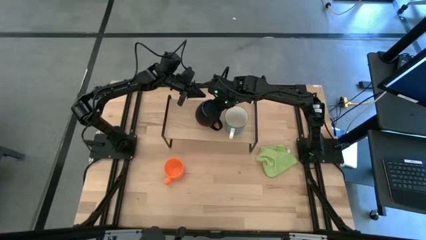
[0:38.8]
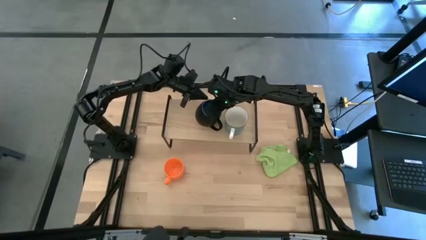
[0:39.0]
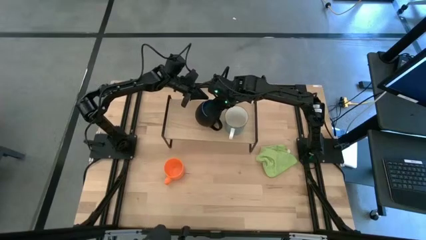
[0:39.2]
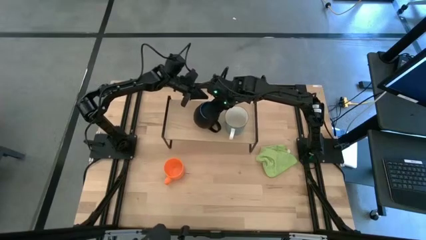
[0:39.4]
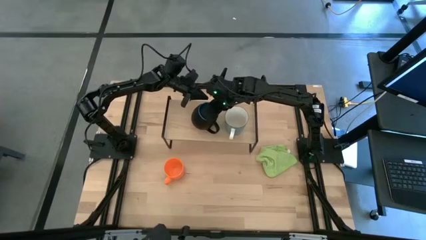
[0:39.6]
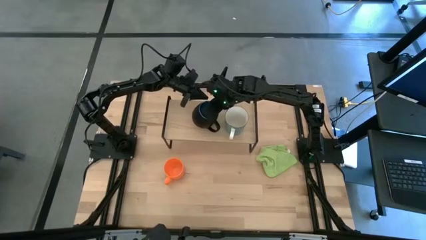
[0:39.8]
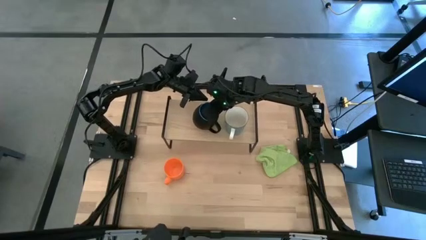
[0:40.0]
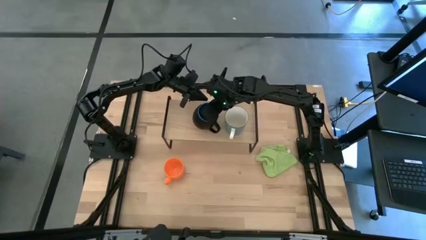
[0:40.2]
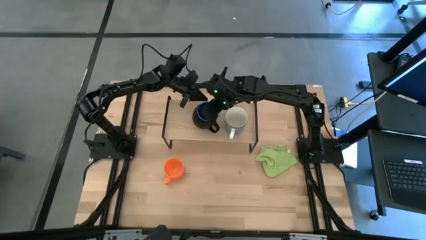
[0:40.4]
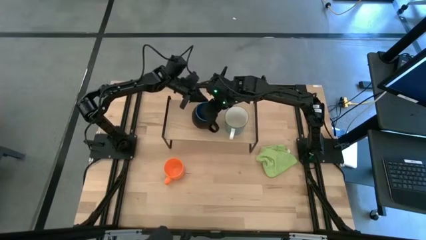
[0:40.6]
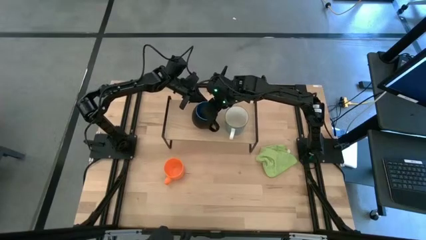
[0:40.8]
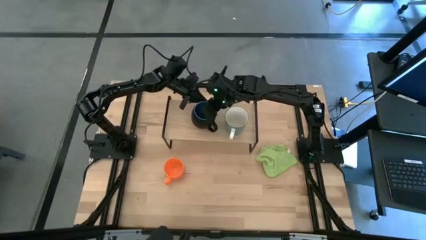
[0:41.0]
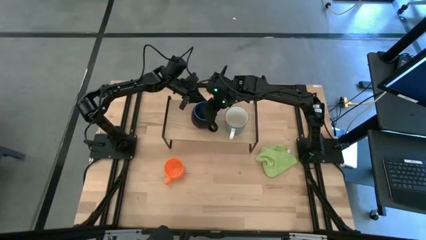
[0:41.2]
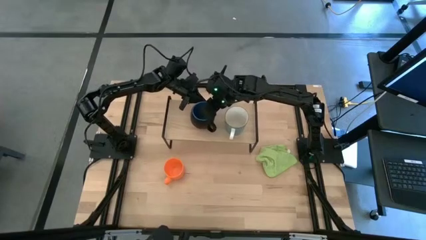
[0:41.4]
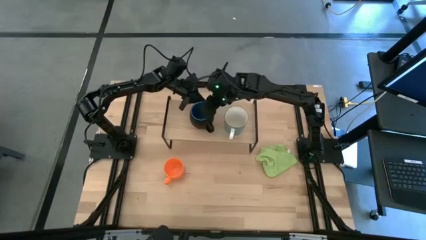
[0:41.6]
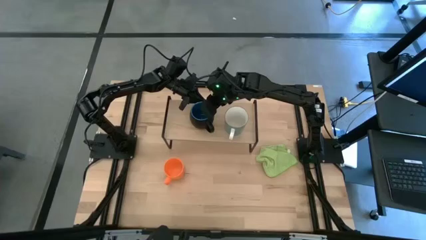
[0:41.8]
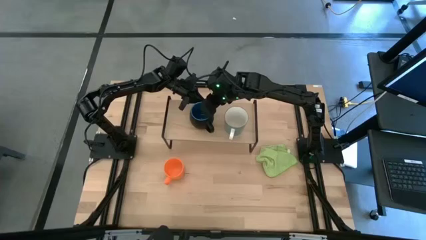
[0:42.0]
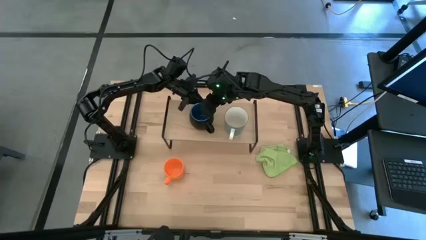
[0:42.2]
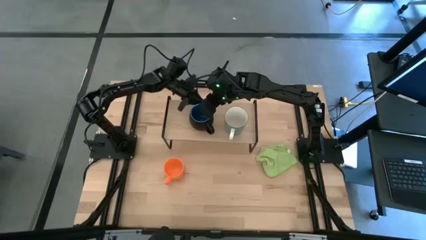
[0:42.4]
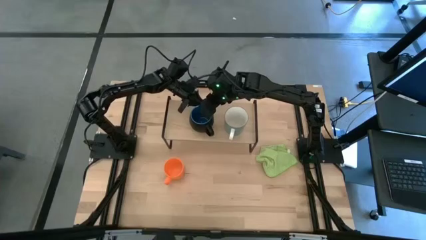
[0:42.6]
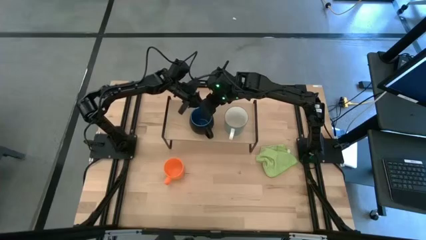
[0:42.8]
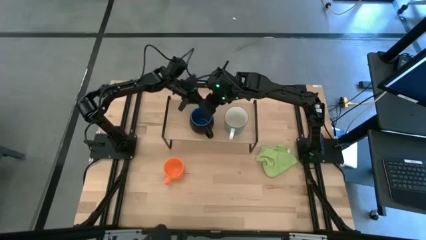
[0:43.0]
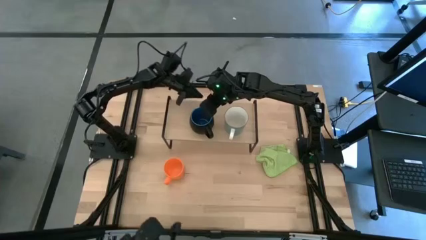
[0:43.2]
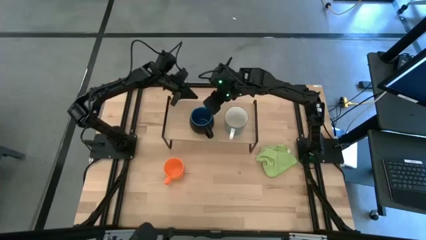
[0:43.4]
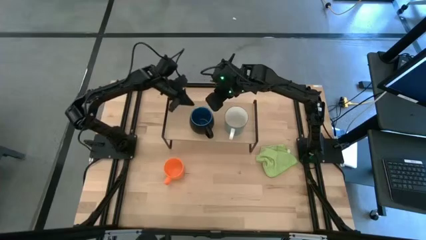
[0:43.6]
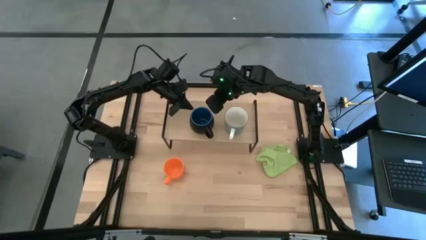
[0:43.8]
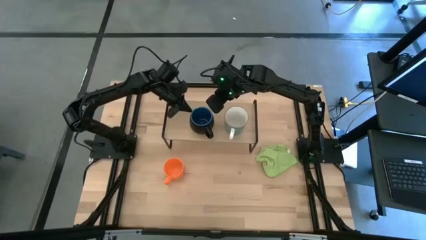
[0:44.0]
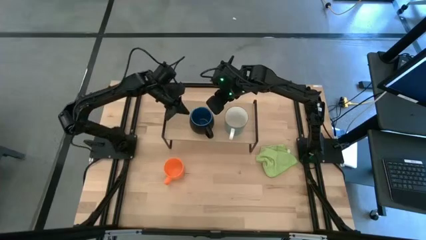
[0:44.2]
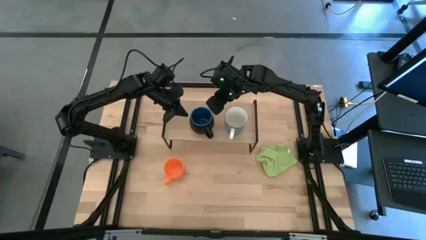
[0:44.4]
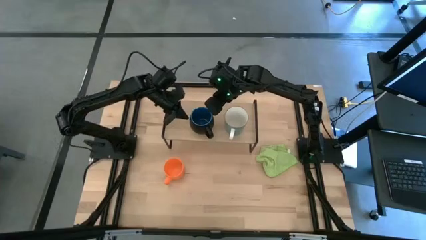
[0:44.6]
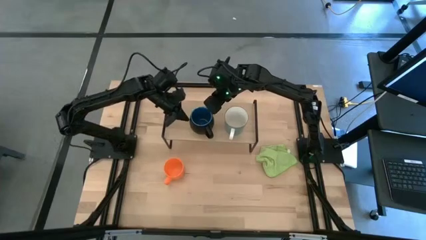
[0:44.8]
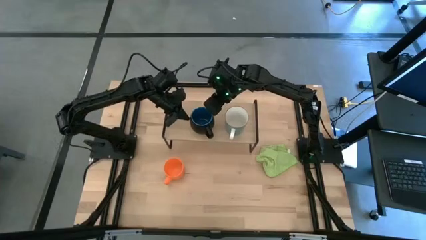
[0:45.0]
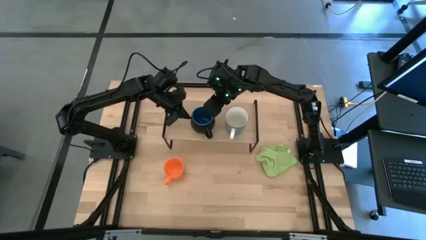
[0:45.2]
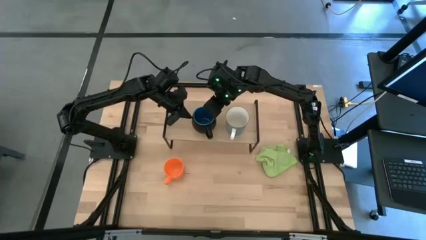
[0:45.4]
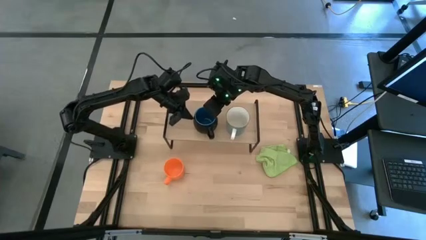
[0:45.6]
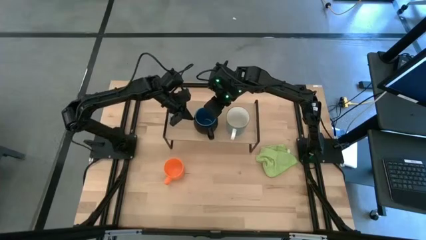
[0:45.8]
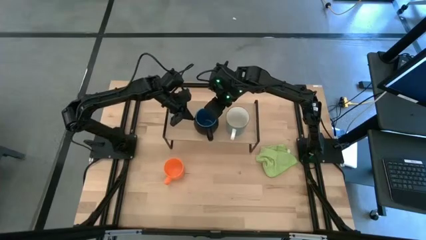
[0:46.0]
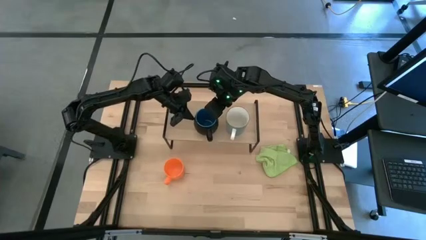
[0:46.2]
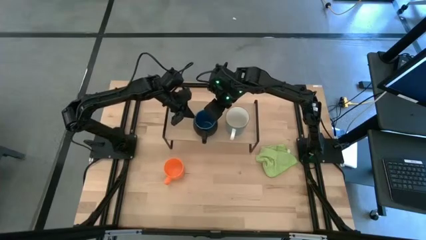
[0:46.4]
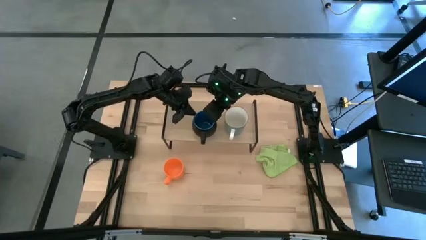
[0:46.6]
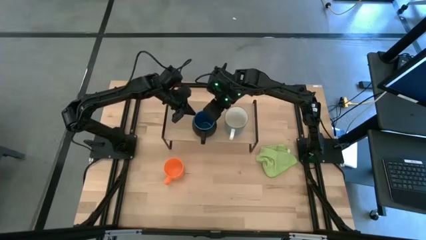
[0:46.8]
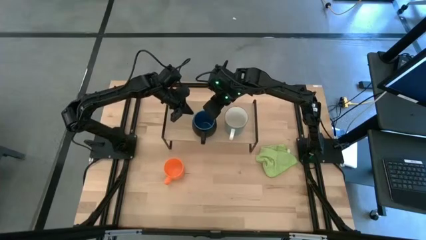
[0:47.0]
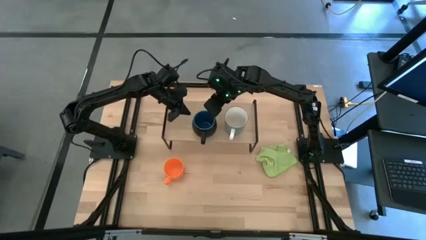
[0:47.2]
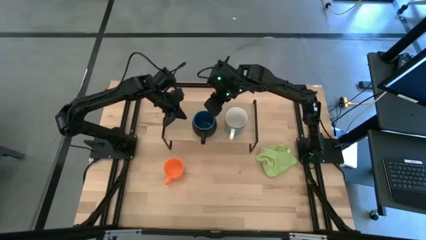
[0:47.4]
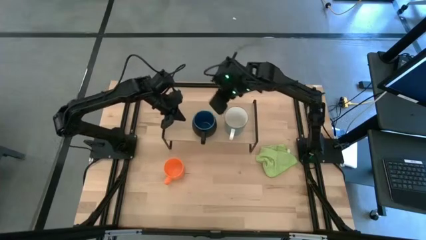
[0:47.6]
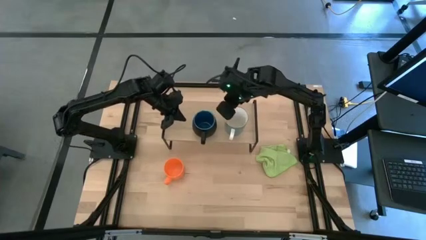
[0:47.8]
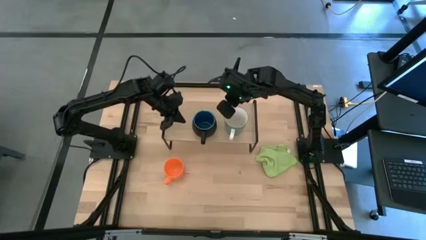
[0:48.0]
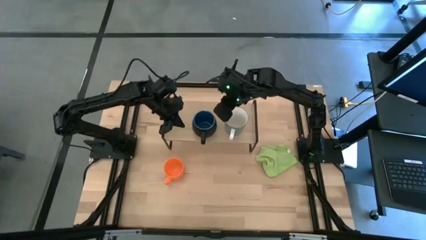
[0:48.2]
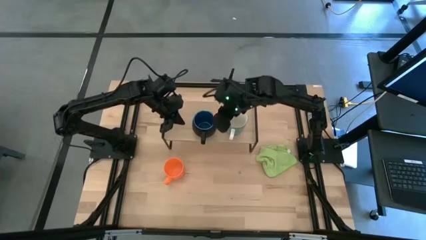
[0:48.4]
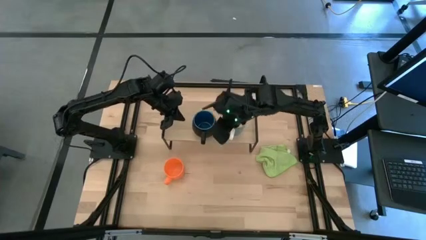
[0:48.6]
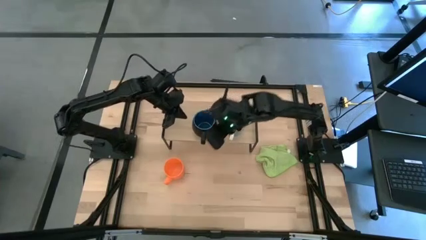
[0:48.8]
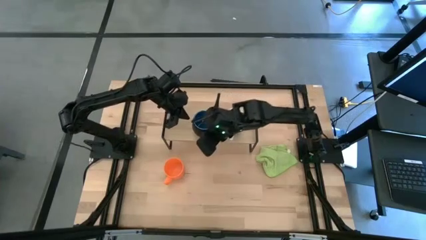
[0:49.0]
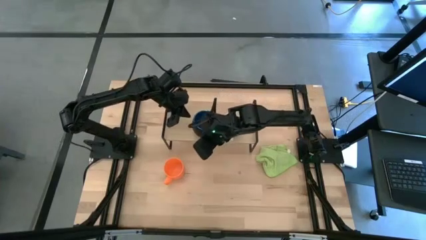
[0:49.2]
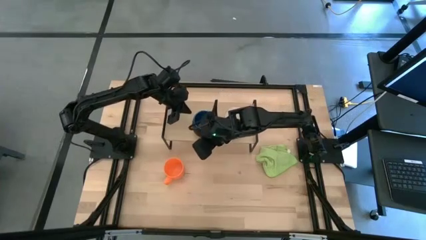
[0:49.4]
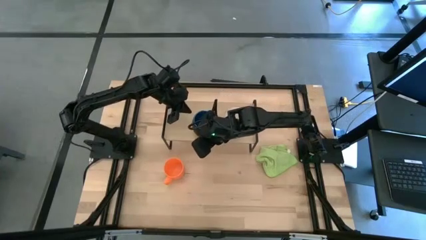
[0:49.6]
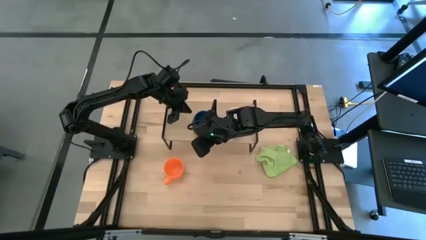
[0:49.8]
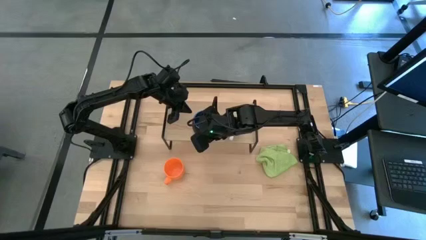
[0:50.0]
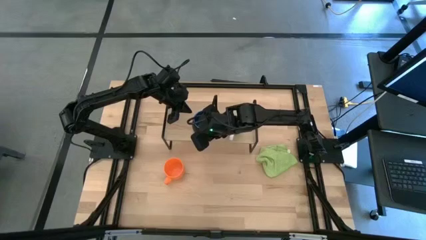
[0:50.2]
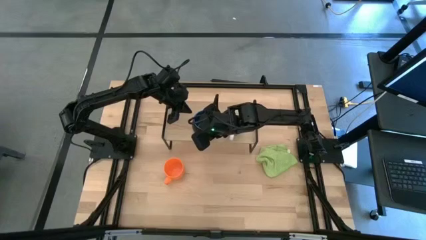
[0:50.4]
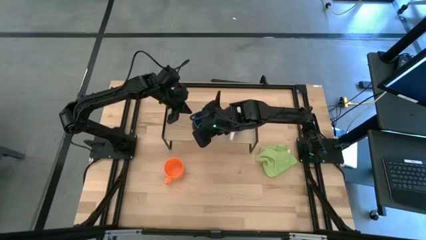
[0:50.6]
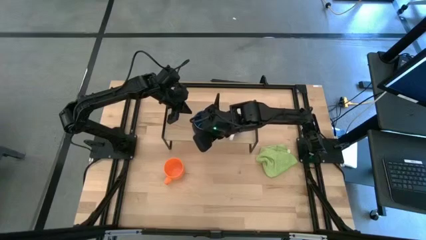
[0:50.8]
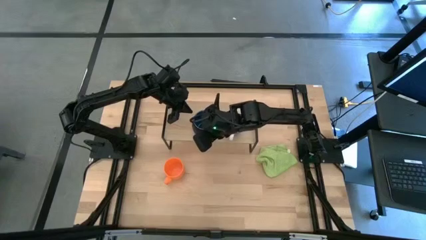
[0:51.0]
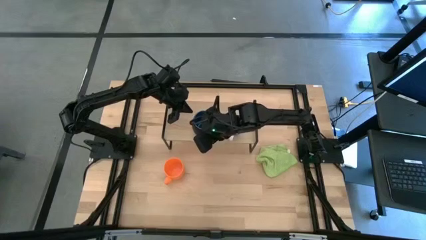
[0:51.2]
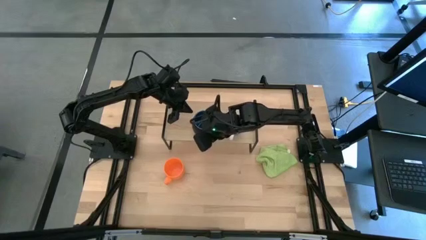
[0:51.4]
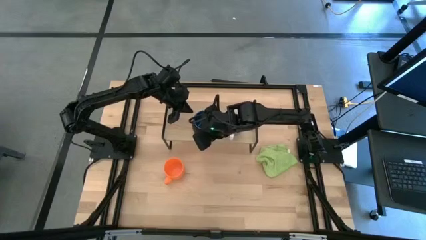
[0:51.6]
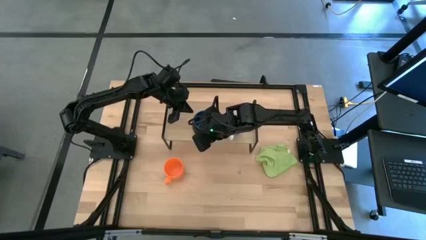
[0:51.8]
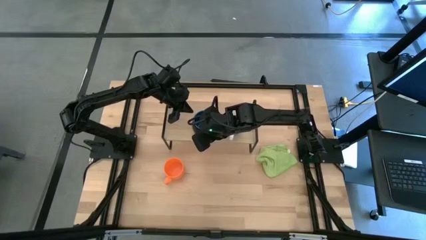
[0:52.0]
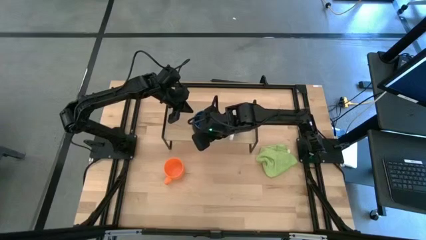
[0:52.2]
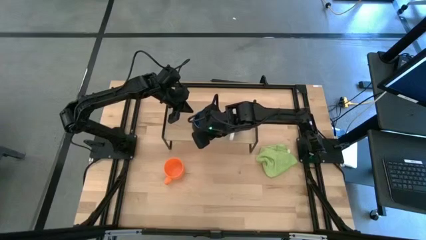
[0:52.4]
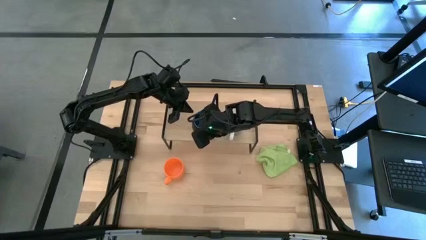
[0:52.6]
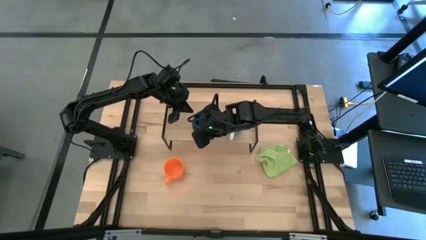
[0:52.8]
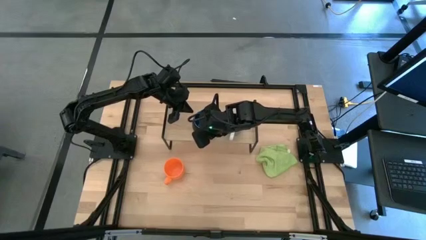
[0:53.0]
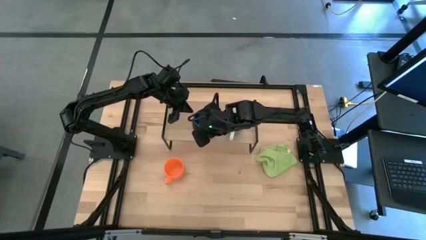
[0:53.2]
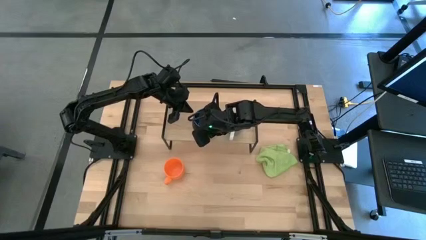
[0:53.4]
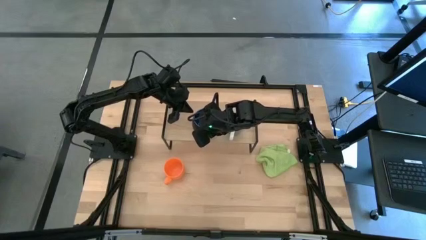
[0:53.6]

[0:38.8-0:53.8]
Task: Stack small to large cups/mugs on shelf
Put the black and blue mug on the shelf
